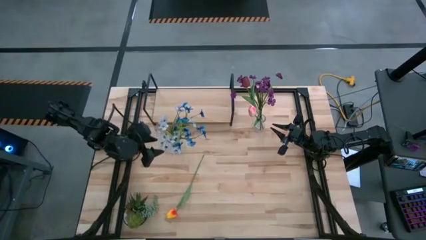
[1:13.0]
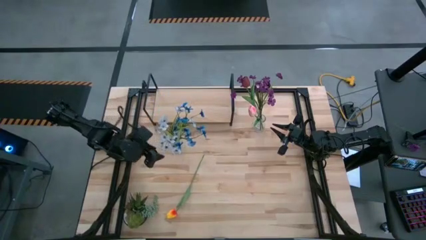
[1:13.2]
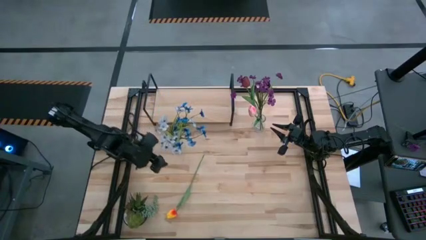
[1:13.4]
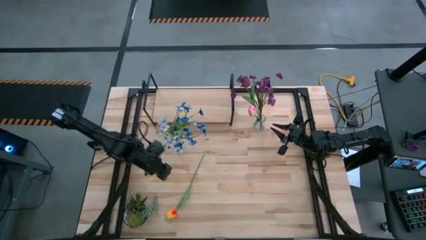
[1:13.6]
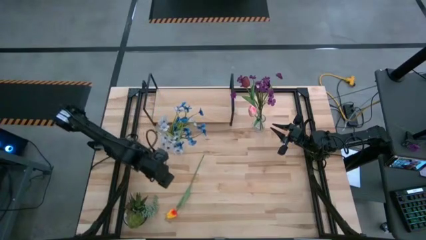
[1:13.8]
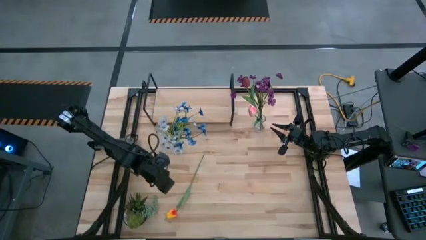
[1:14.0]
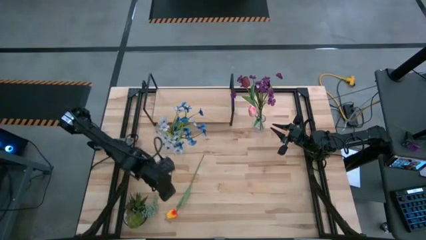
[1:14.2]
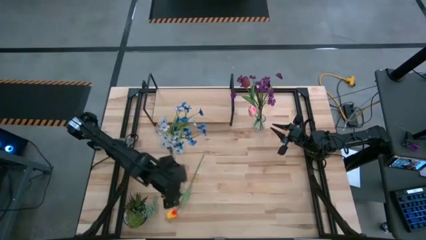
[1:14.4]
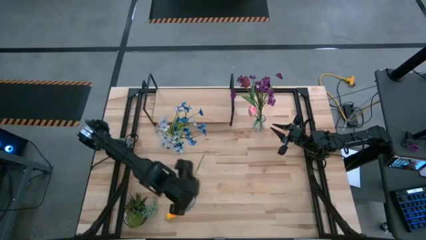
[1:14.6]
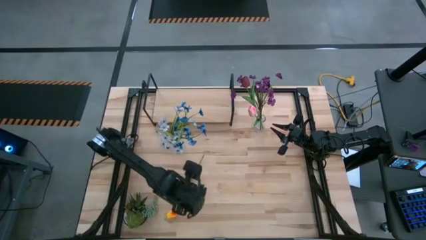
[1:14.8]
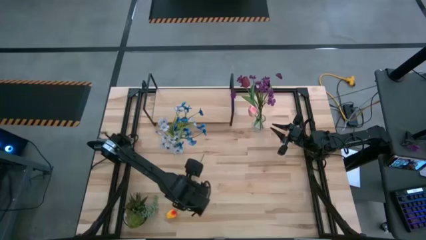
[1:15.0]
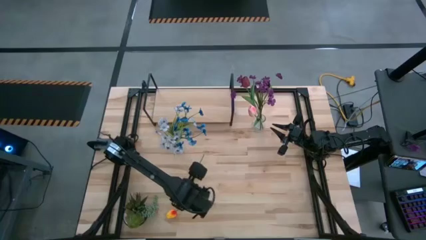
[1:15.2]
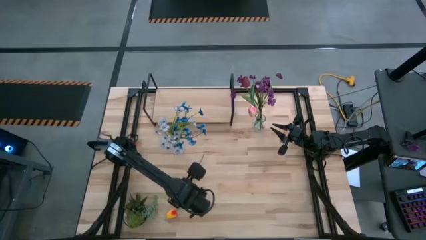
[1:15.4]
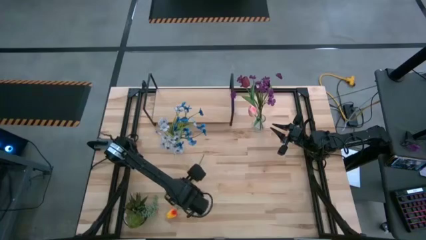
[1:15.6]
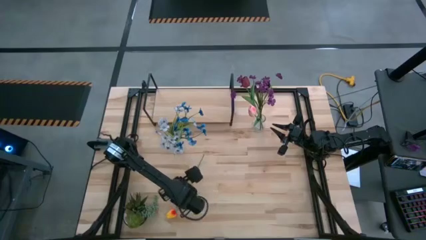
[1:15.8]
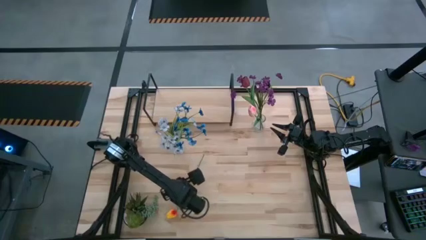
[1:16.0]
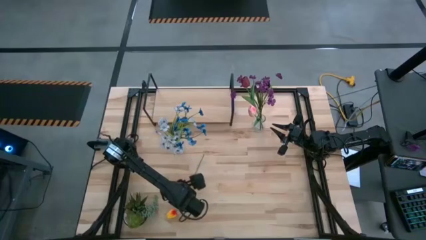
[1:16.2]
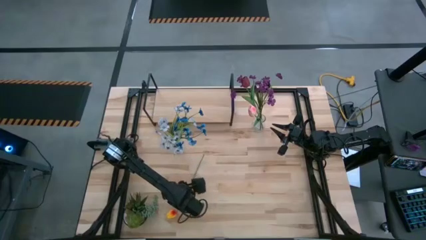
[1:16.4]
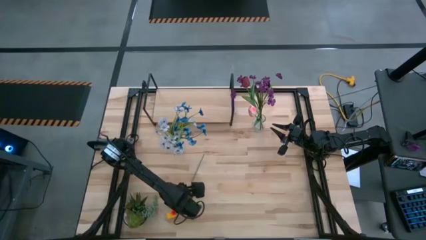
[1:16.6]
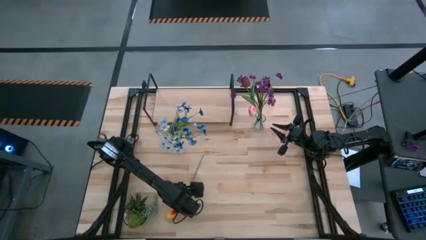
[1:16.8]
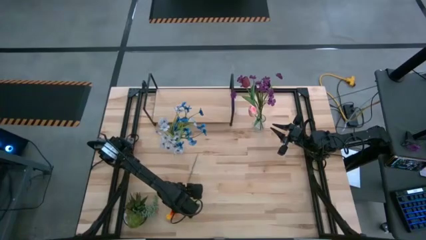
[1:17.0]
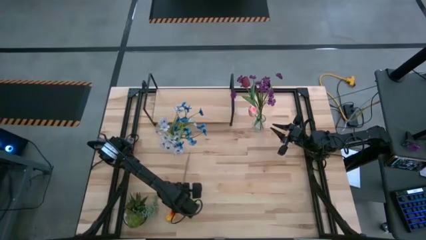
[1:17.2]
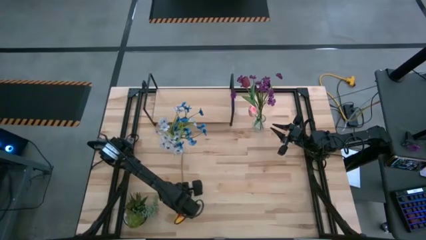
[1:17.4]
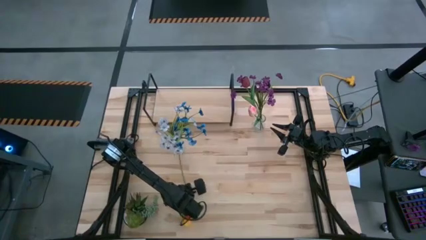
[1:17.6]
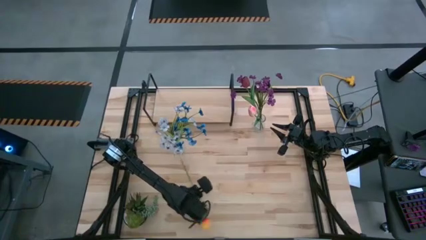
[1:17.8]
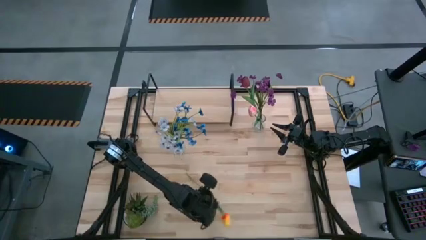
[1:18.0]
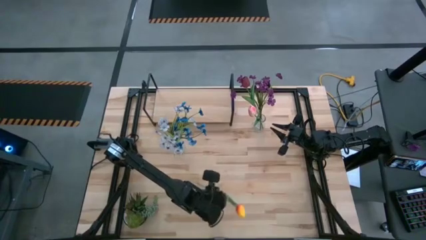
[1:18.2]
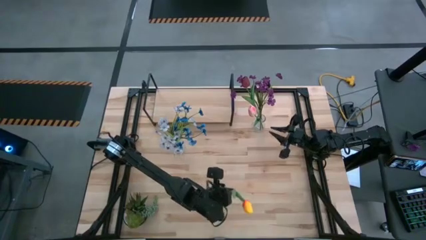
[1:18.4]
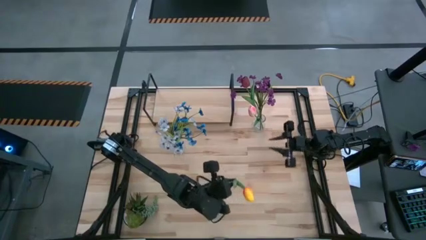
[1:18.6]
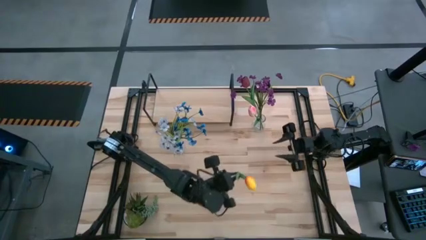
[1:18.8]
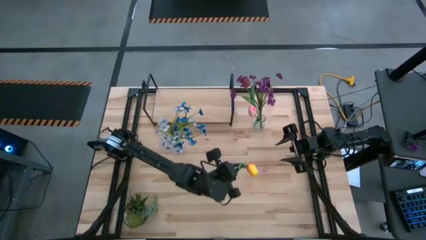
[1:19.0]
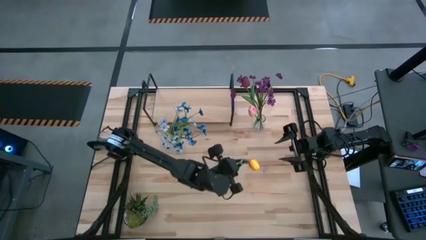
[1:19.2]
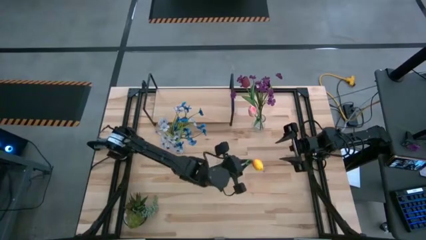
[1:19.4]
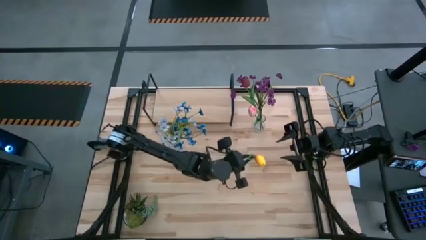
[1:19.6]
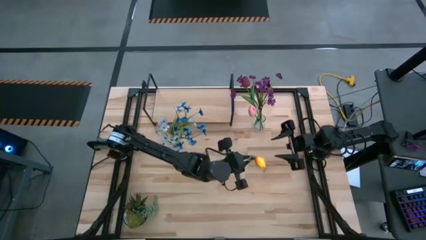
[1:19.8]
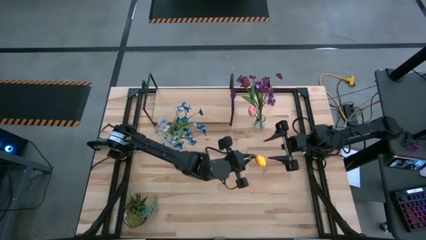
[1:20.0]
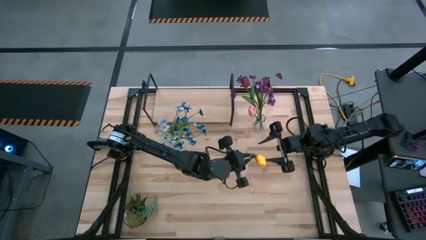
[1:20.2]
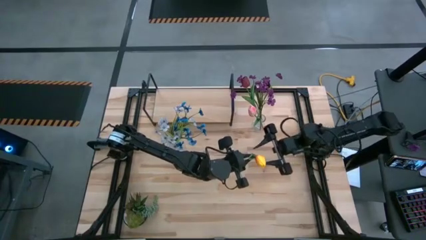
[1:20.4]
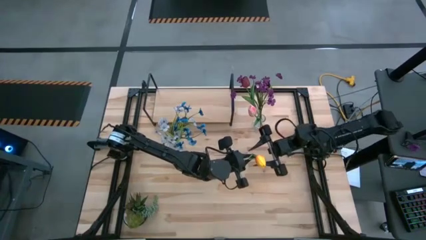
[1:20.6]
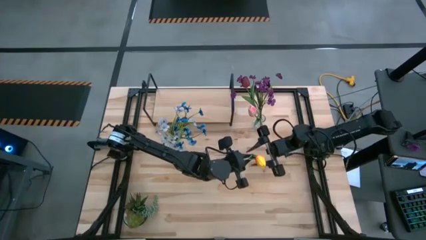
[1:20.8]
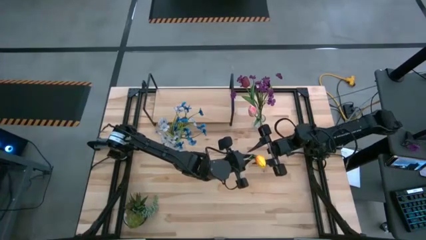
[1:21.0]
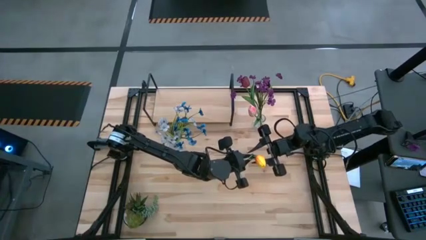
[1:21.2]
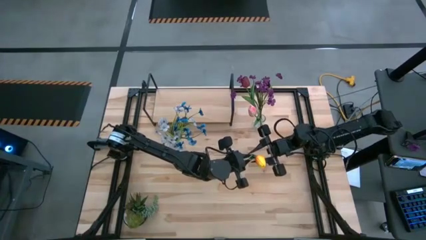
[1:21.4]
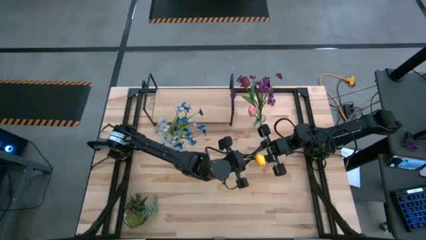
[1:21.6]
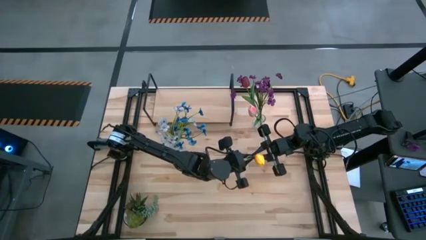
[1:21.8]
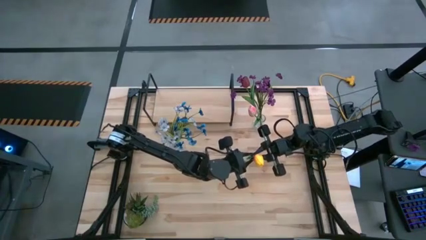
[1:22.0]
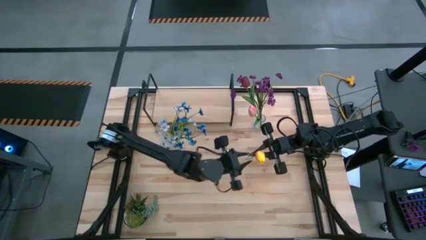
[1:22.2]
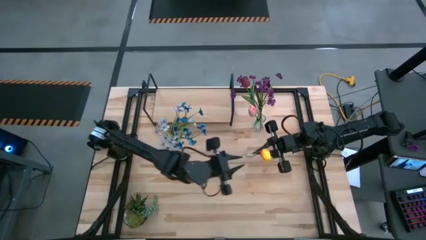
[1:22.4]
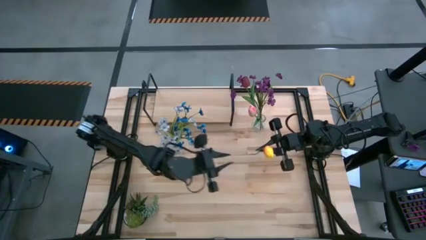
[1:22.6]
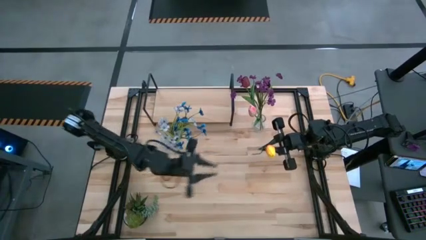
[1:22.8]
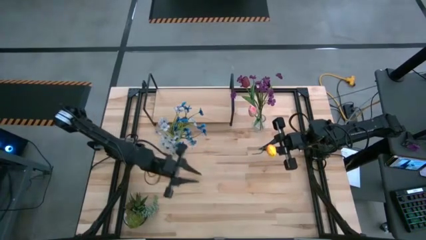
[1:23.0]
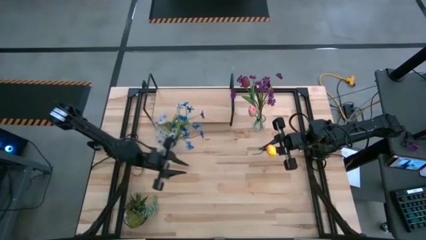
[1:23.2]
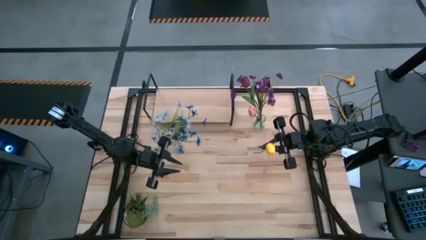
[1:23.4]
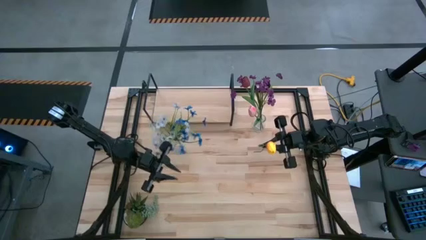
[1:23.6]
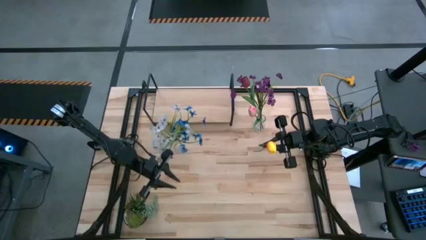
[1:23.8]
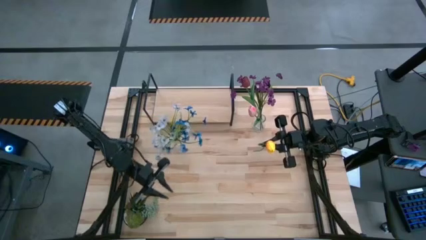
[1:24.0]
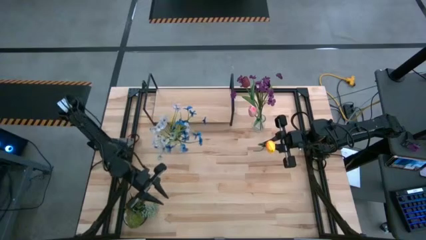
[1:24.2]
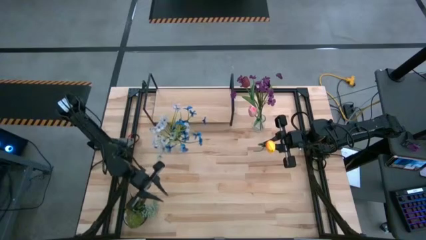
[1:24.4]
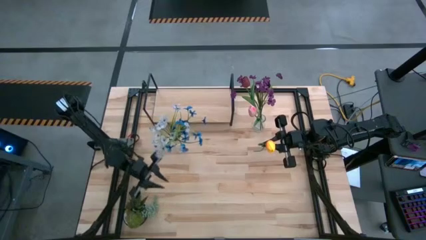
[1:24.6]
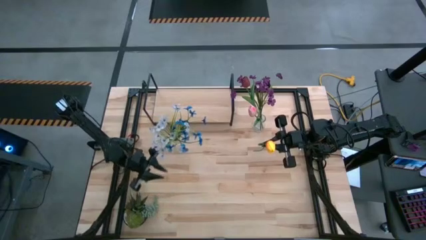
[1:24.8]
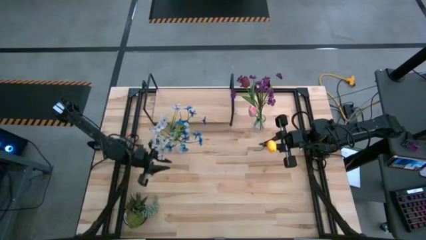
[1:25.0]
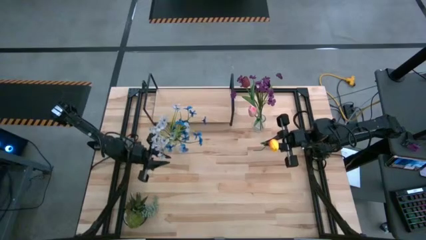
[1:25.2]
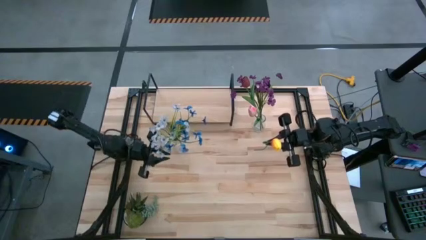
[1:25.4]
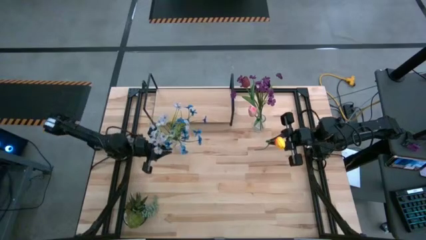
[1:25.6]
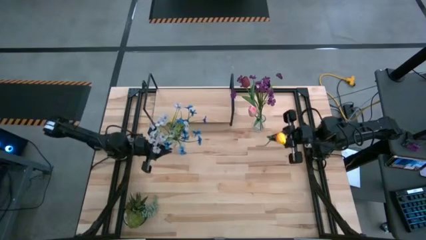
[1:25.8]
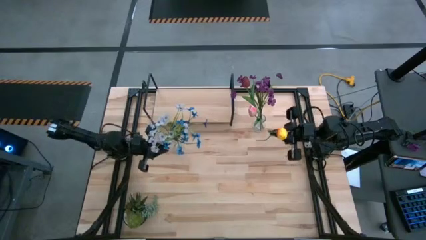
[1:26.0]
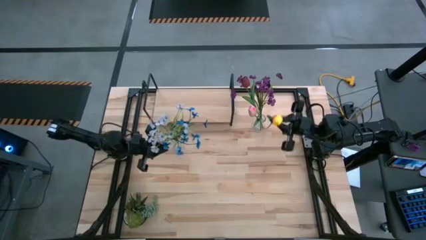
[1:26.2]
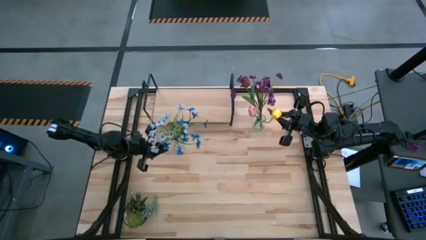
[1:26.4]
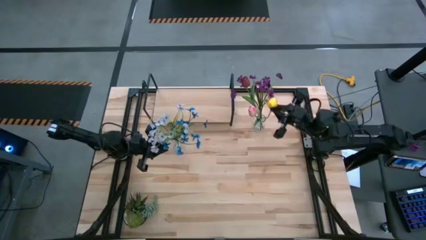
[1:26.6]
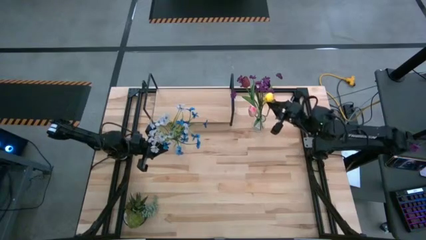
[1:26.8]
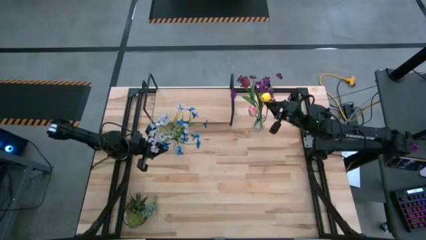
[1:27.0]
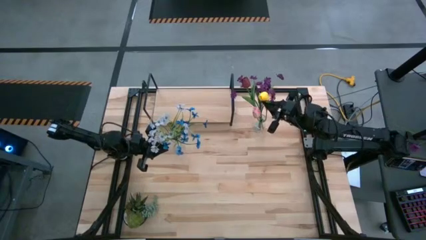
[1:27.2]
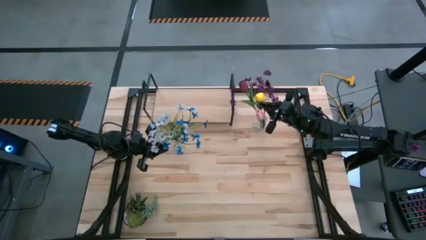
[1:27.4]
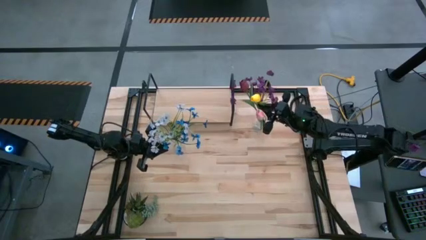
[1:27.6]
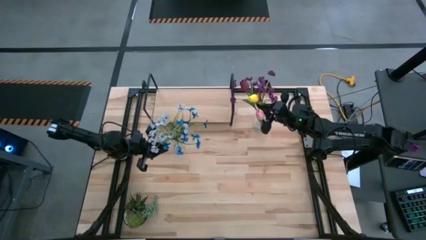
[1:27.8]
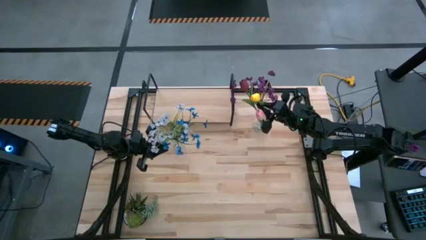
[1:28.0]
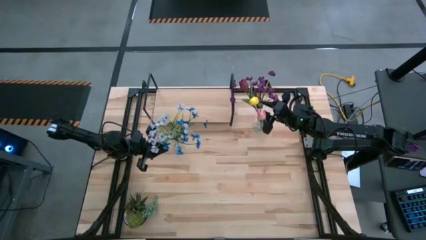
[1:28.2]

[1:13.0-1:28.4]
Task: Pick and place flowers into a vace then onto a shelf
Put the yellow flower into the right transparent vase
